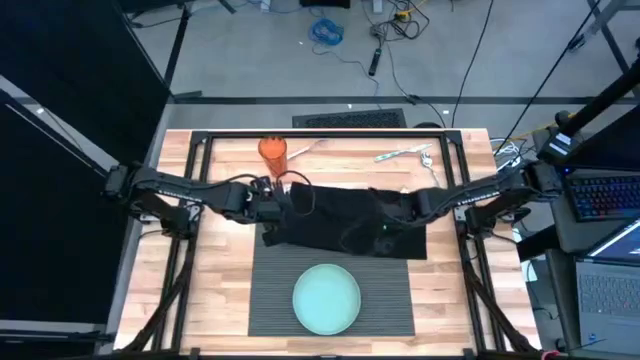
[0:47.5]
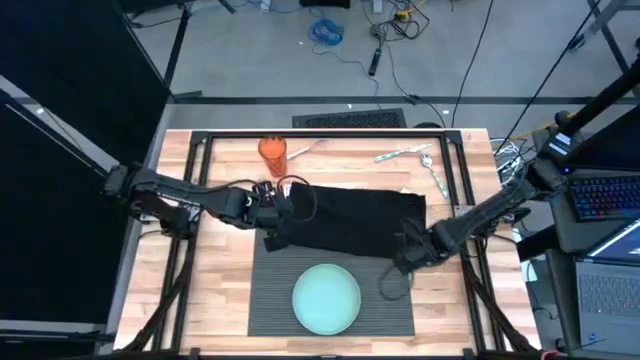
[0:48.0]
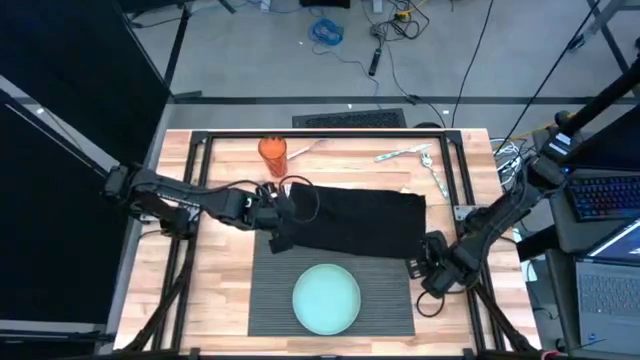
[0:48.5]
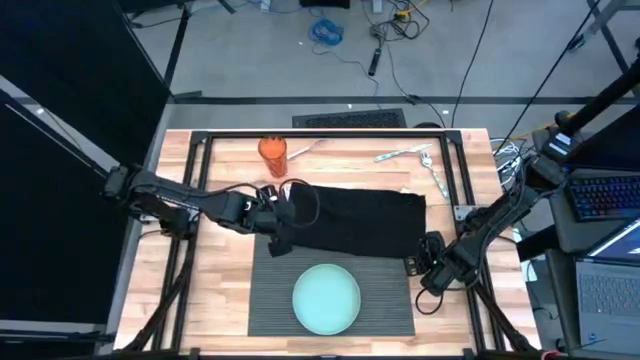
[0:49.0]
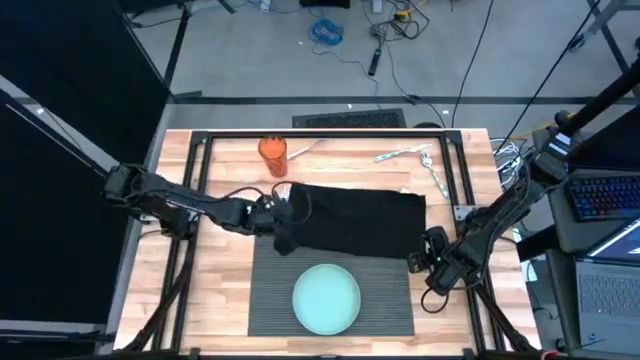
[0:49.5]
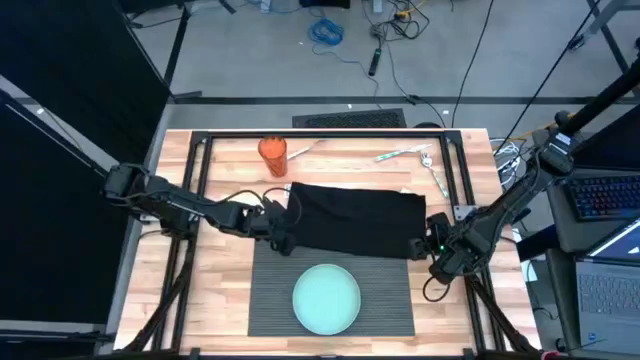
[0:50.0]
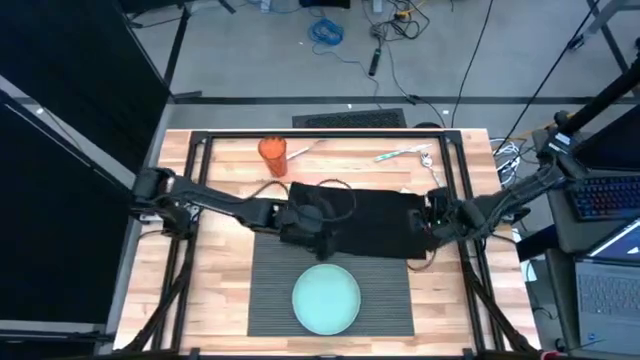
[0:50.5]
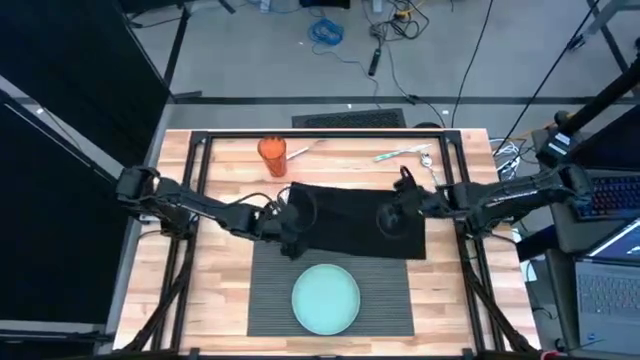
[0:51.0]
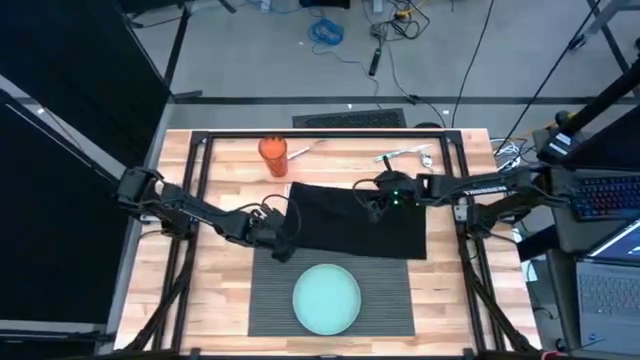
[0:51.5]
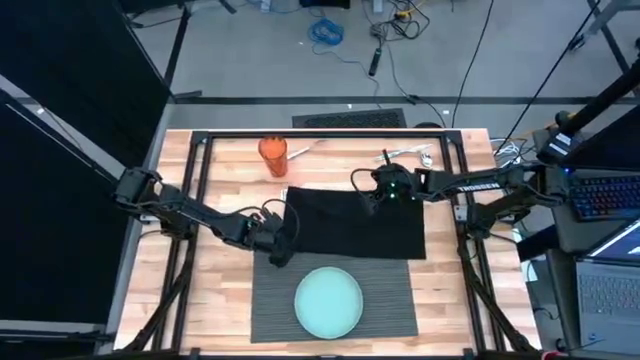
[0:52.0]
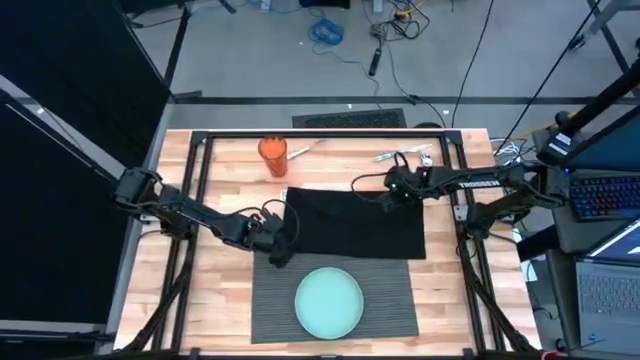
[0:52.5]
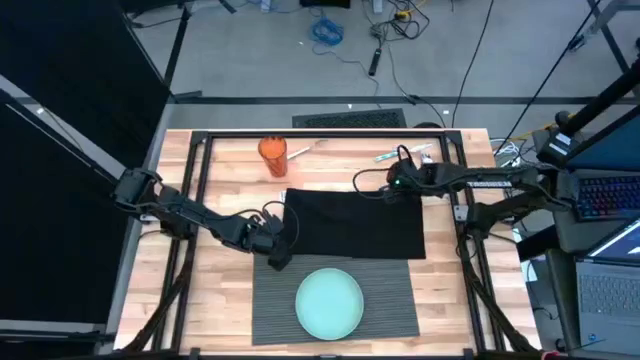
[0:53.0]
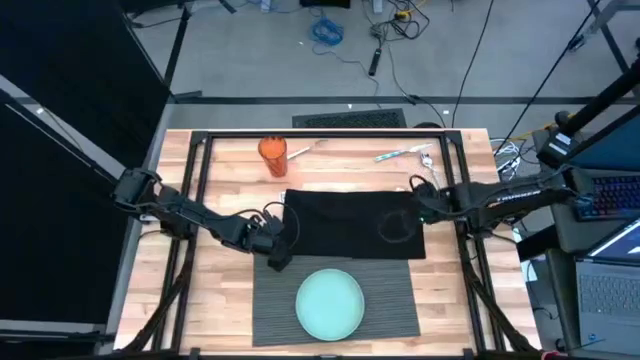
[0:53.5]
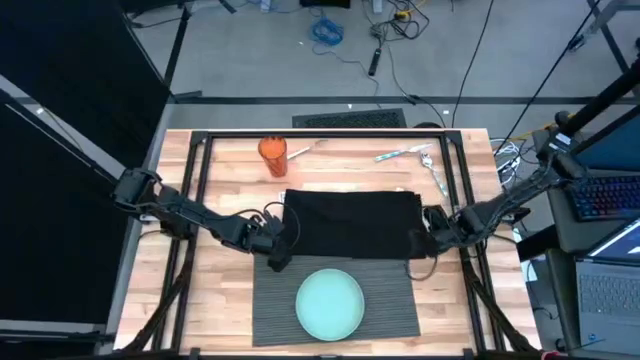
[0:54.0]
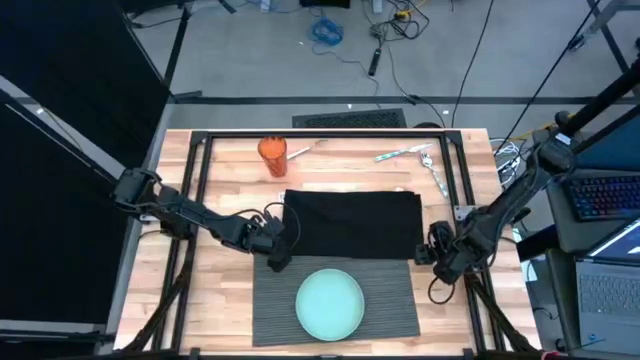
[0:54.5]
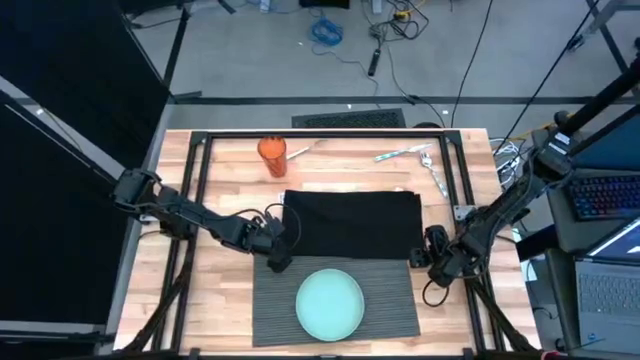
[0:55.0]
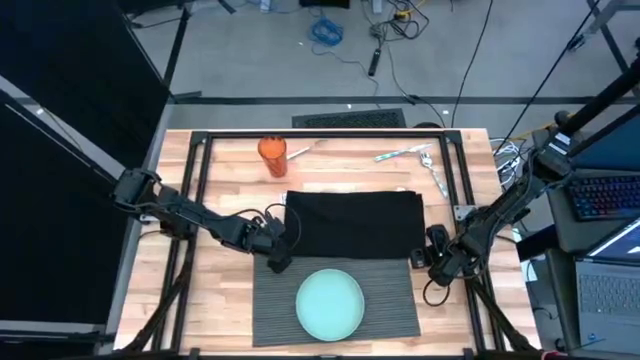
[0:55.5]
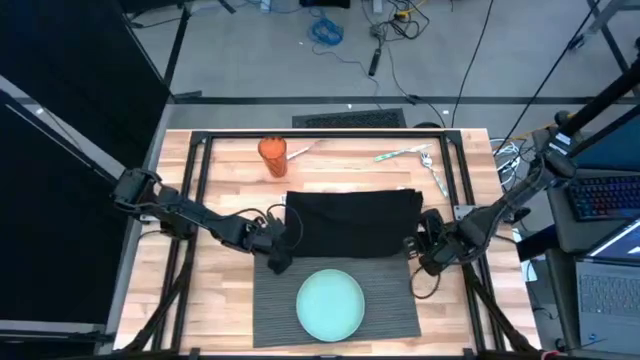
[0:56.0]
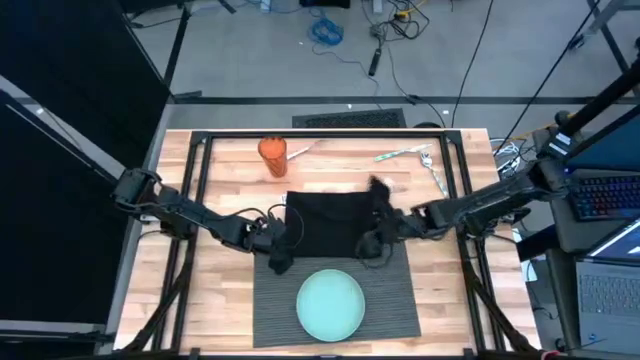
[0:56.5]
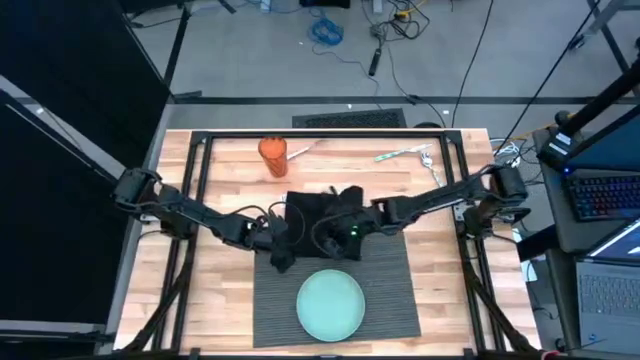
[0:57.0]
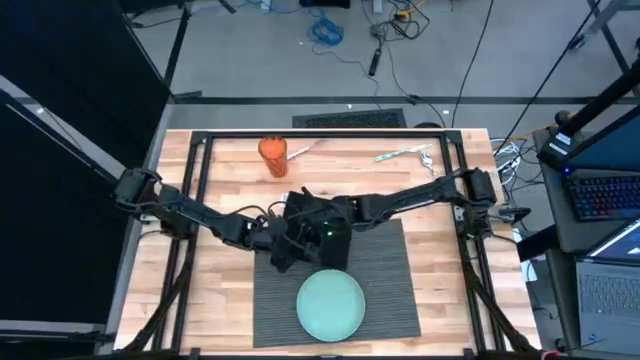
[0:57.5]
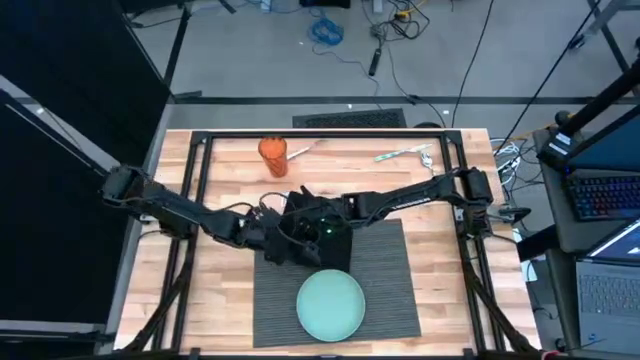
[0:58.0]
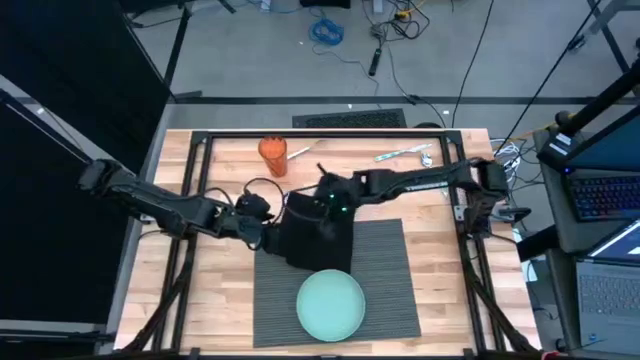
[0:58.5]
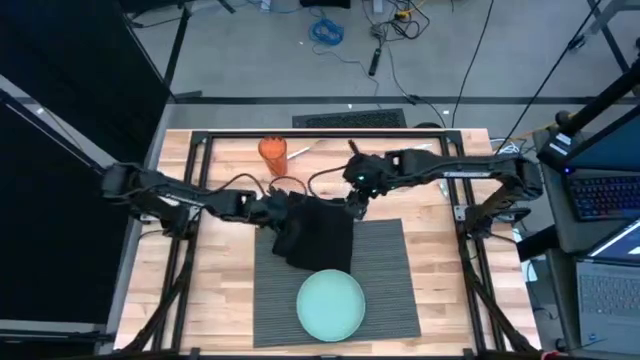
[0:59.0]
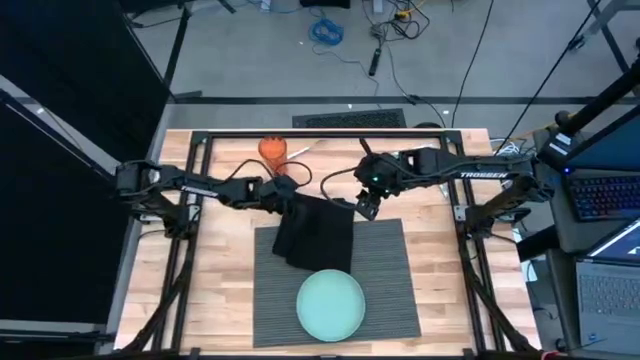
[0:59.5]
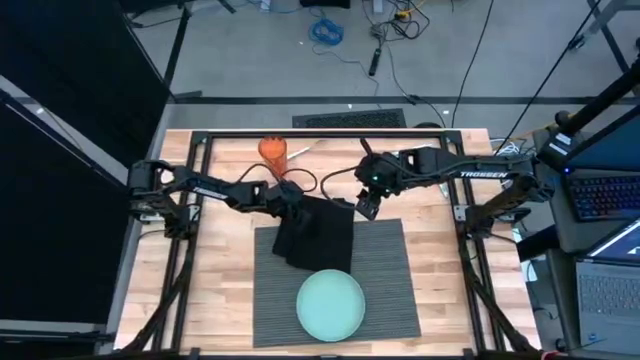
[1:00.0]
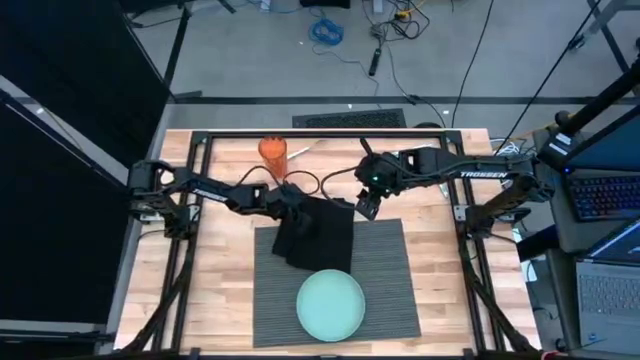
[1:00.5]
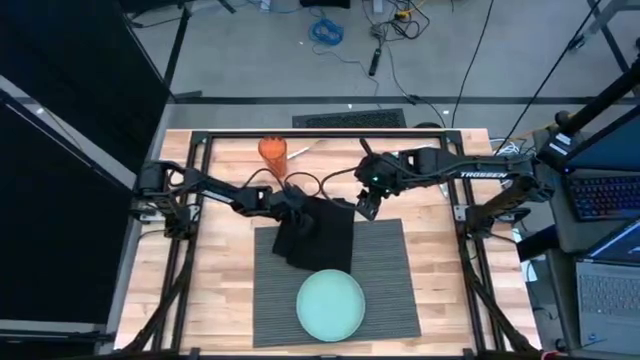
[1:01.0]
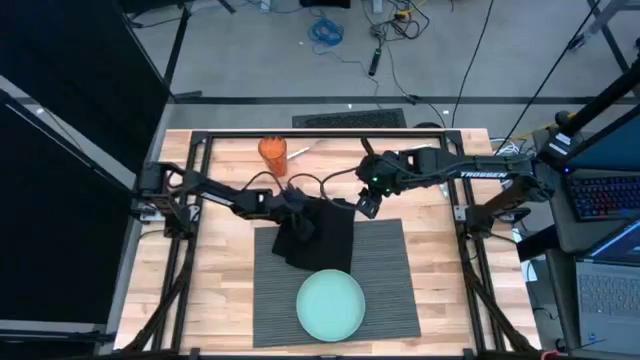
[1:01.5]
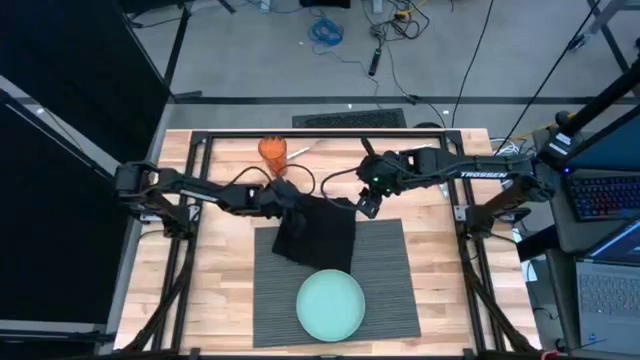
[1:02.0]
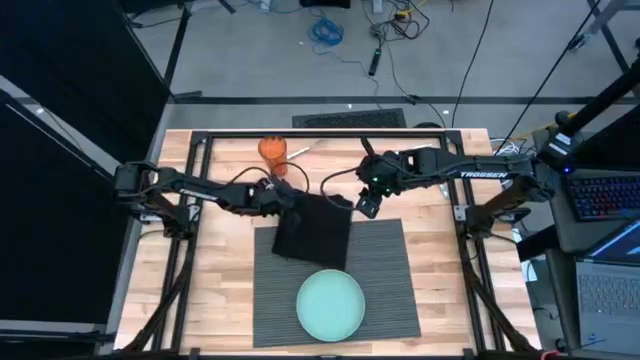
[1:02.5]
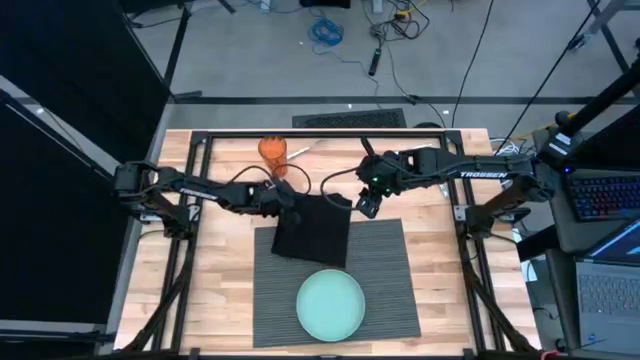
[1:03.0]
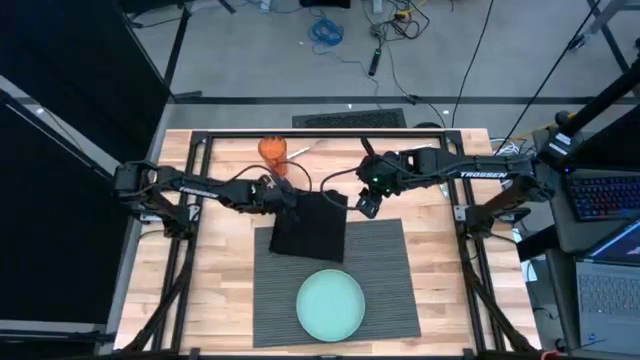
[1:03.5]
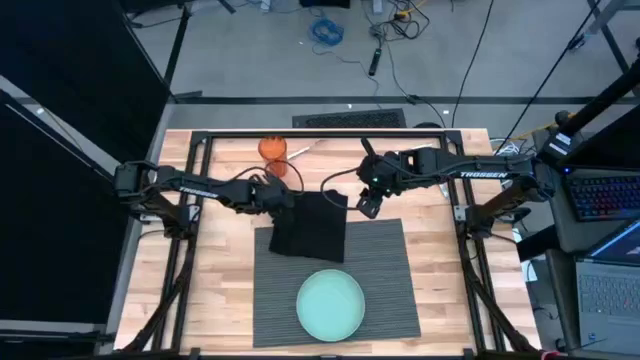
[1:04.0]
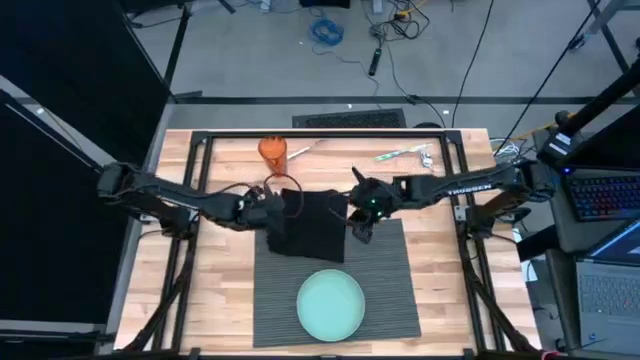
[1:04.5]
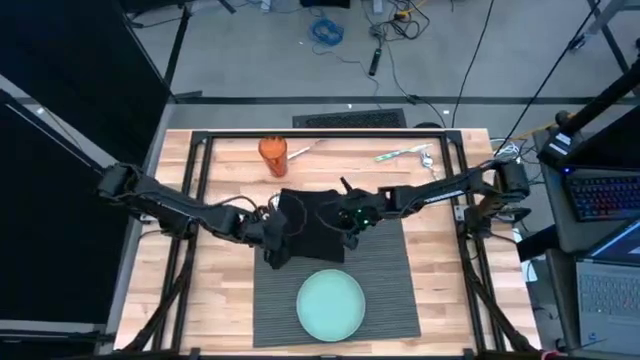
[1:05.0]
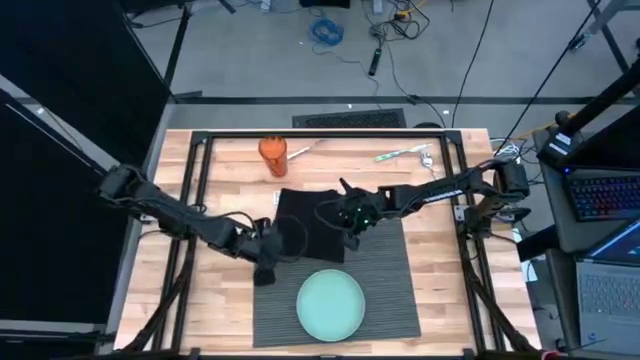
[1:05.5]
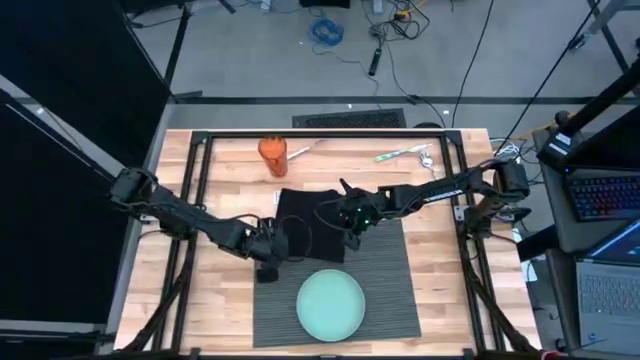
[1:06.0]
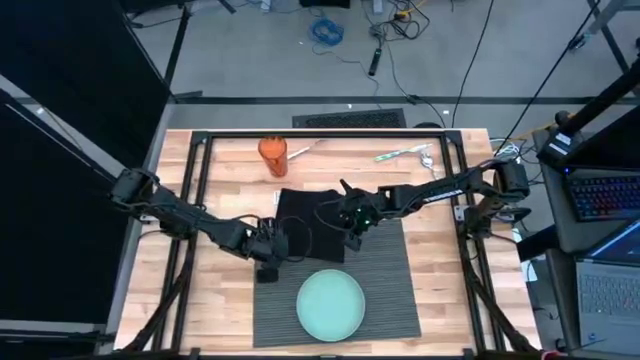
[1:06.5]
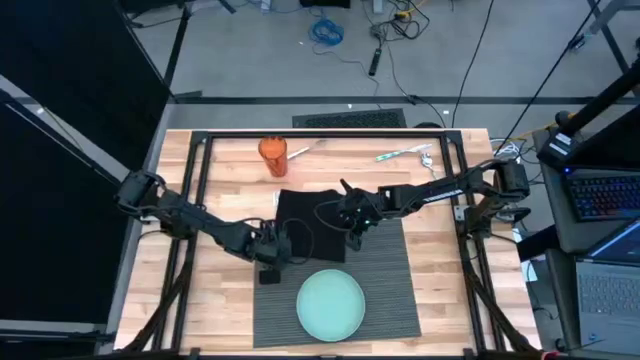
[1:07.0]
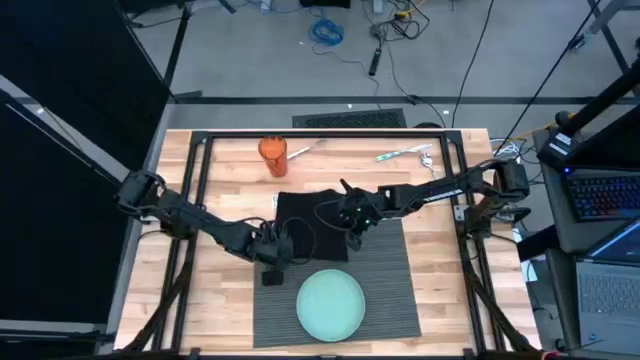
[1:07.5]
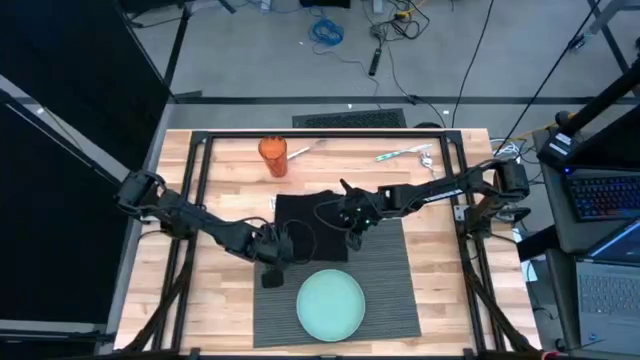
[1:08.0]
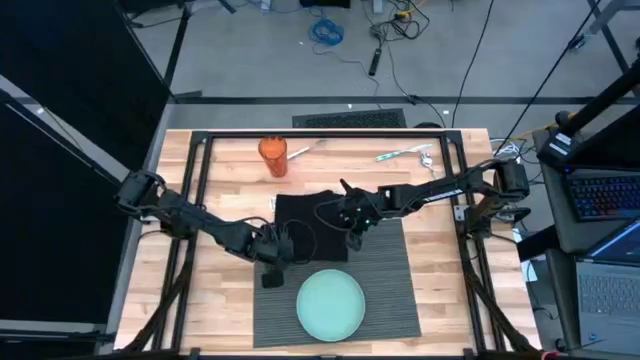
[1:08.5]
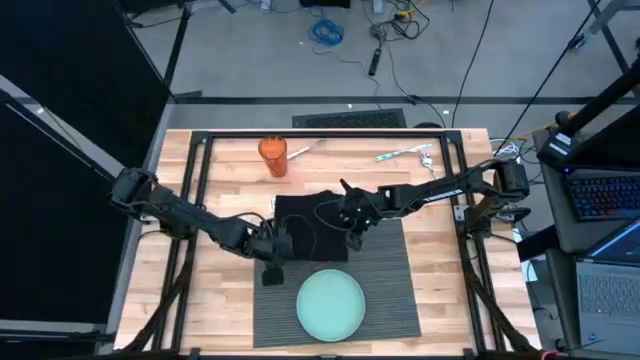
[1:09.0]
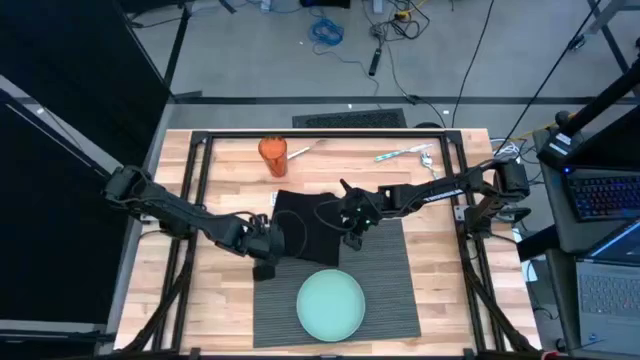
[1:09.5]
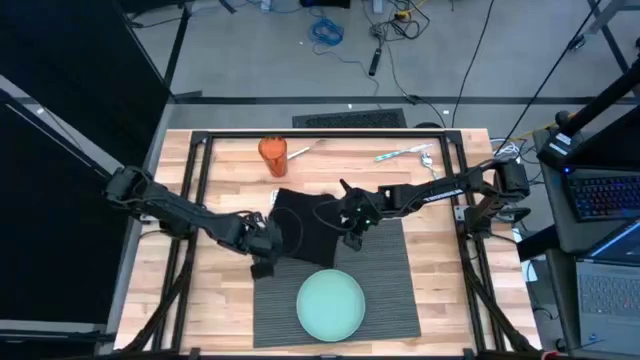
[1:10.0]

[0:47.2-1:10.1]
Task: Set table place
Fold the black napkin
